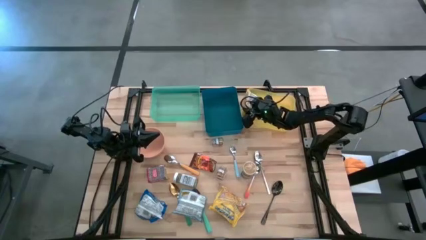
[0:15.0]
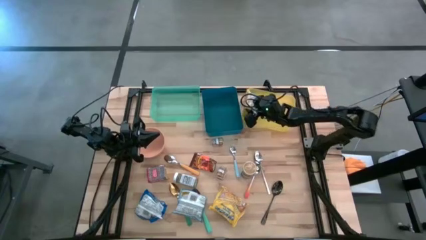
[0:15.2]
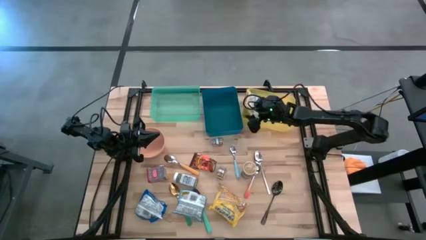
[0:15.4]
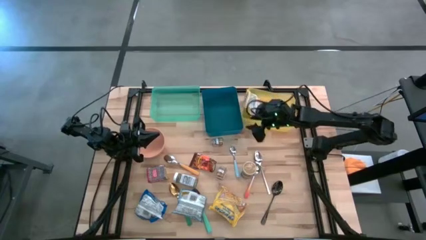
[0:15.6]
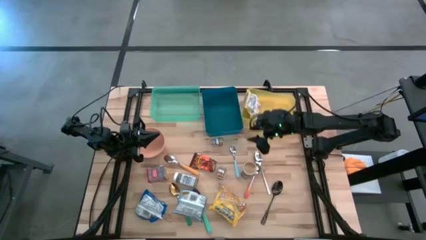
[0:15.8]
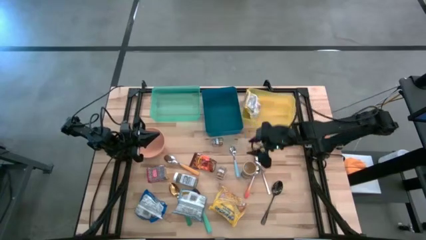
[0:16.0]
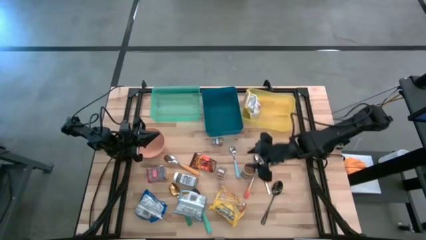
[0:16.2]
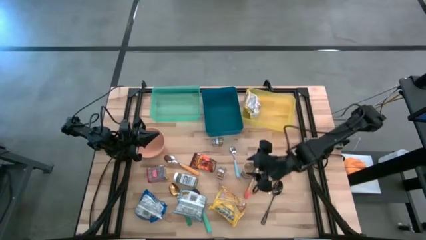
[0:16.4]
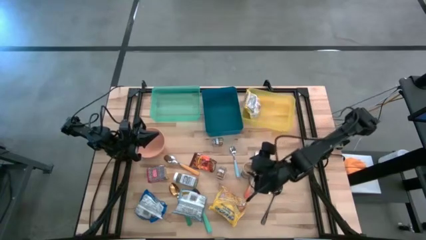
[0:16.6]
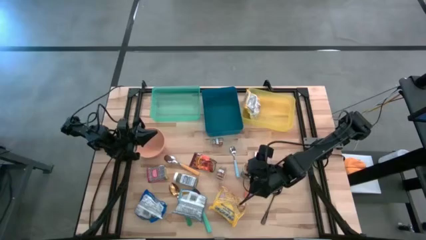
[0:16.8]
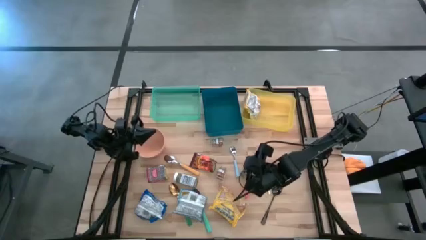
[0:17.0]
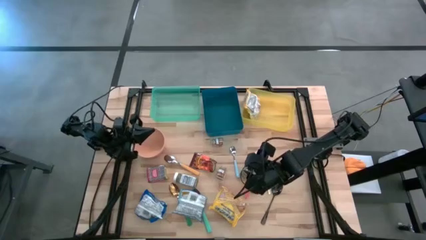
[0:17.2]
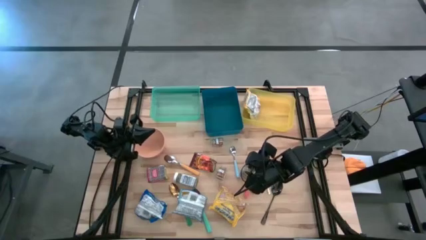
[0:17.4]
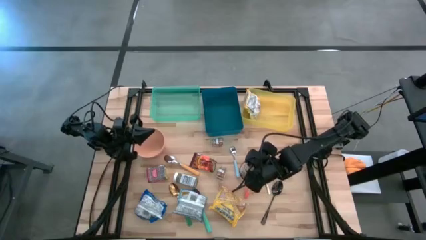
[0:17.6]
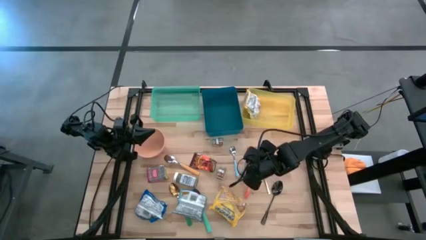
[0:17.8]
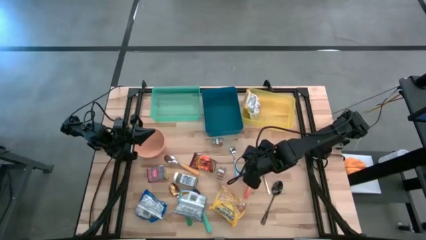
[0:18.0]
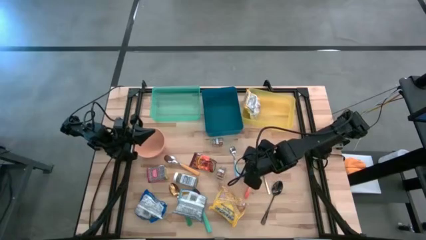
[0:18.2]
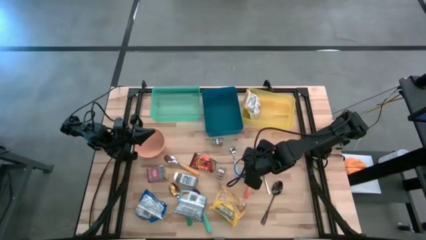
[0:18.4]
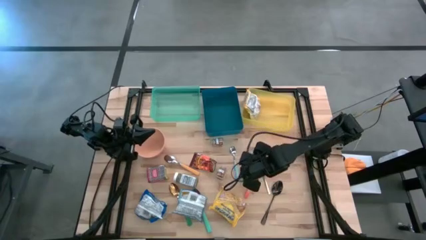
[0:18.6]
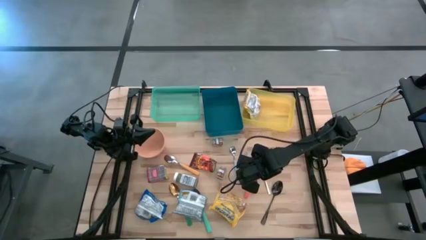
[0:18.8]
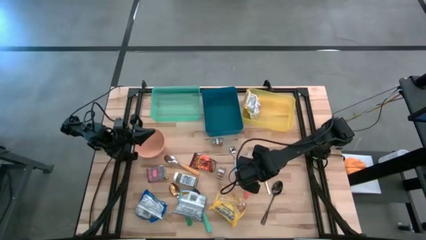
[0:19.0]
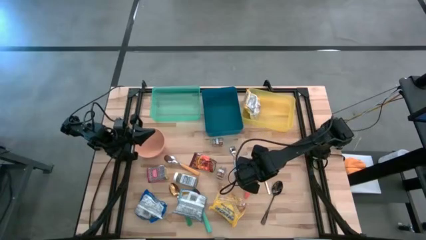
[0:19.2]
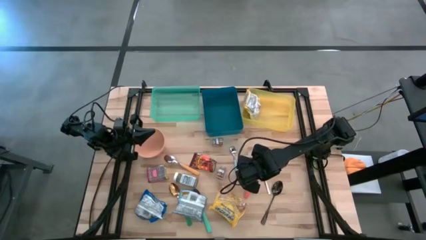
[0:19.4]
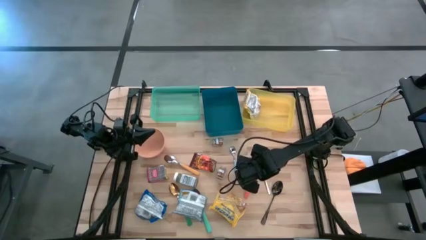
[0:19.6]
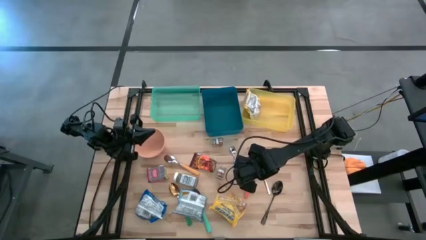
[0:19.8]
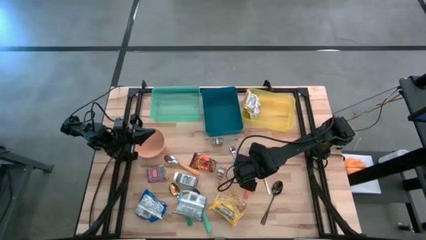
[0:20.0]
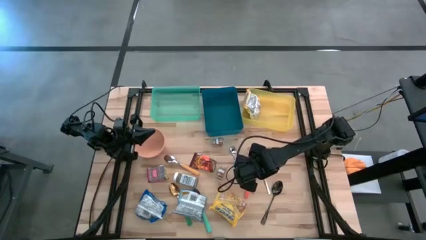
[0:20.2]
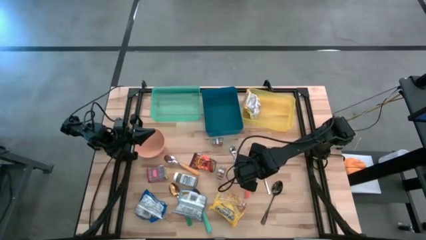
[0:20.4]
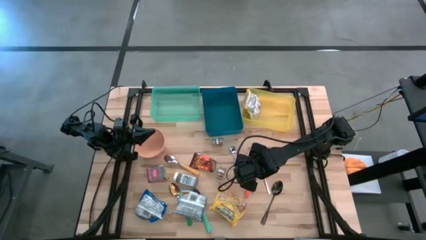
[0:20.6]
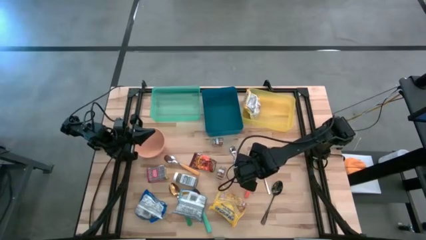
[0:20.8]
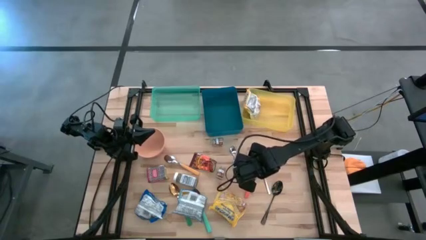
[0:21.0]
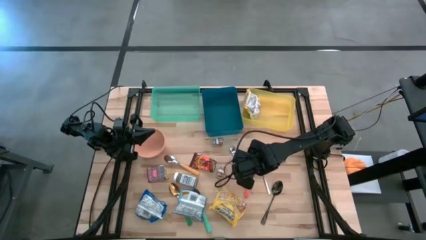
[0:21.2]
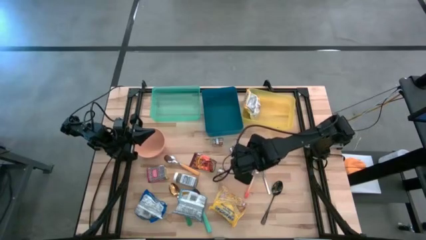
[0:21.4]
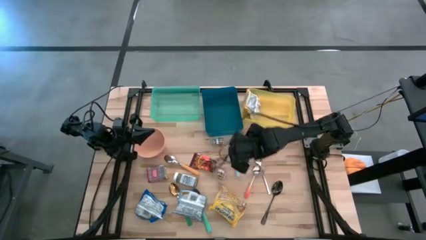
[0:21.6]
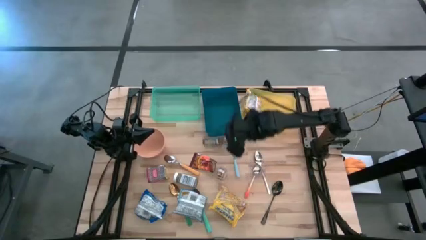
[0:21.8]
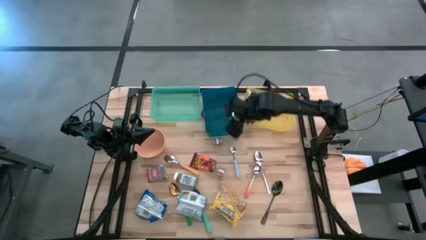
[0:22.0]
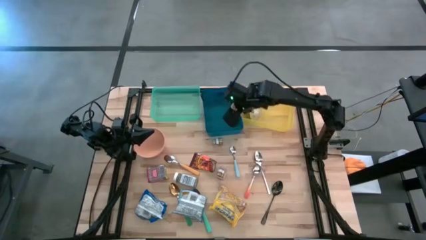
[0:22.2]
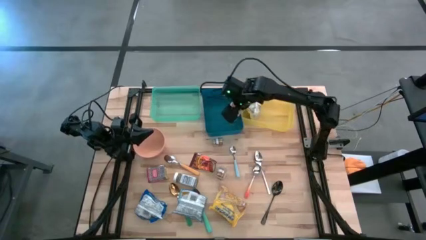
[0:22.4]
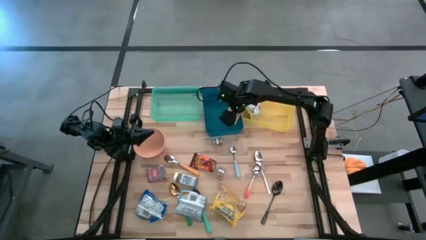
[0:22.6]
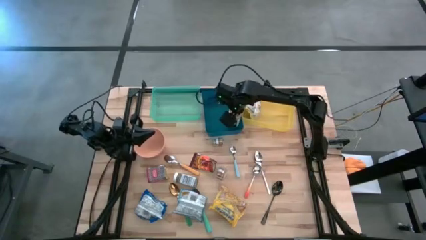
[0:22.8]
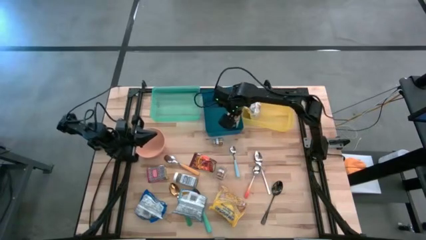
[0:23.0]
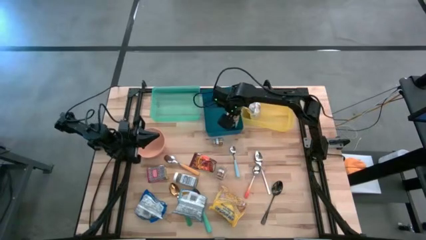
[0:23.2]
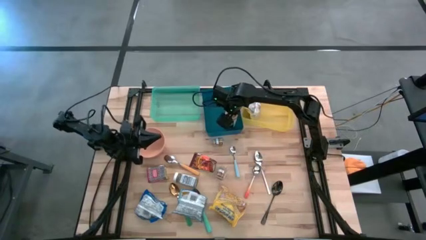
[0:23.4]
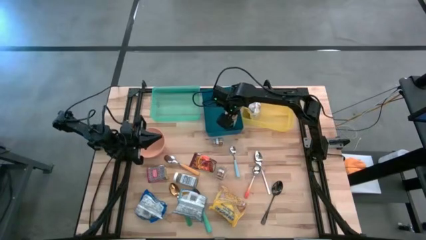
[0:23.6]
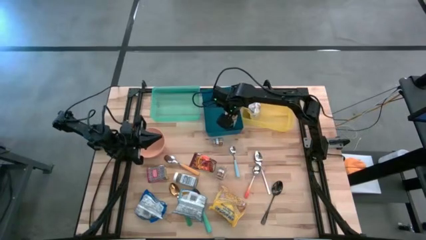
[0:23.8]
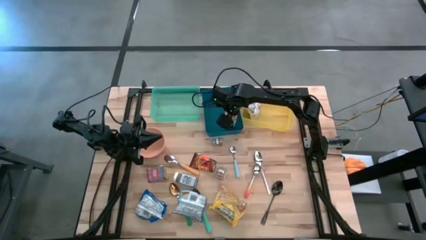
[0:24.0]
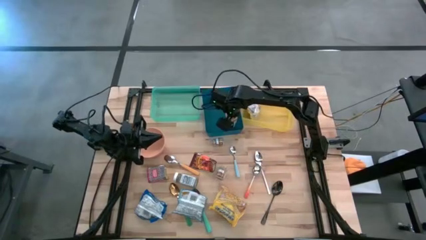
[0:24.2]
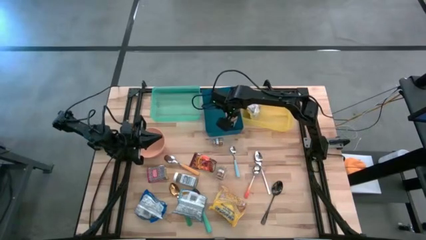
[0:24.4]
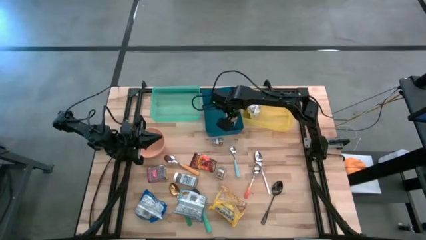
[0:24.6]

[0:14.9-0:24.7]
Put the gold seasoning bottle into the blue bin

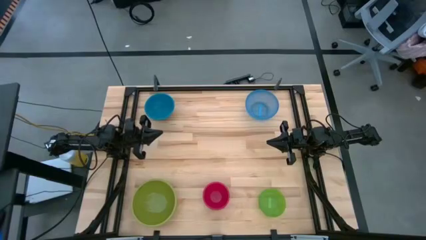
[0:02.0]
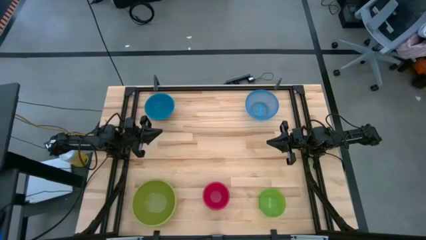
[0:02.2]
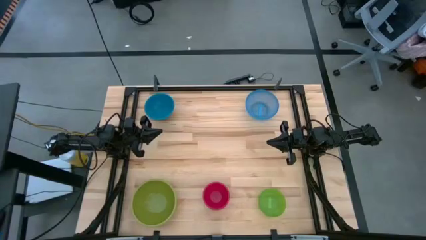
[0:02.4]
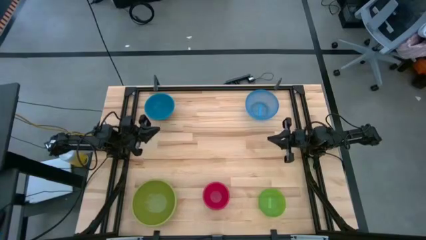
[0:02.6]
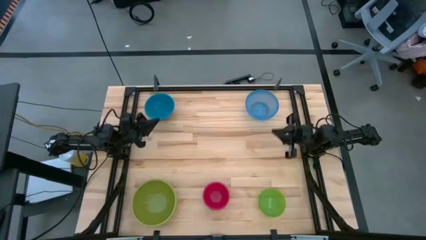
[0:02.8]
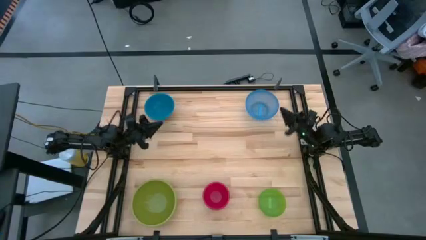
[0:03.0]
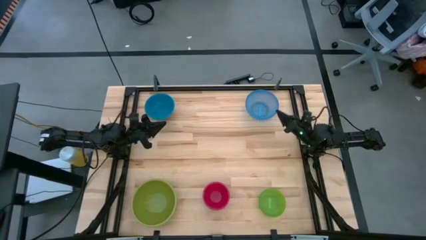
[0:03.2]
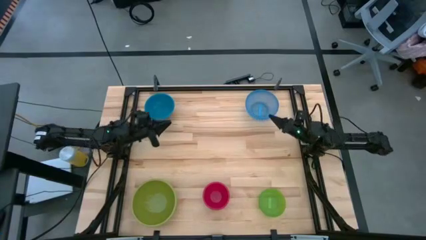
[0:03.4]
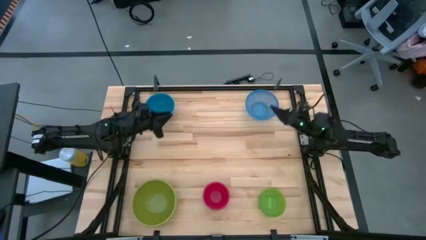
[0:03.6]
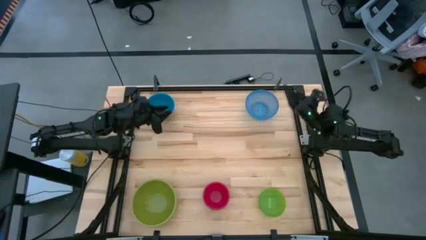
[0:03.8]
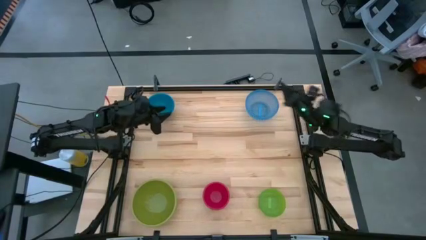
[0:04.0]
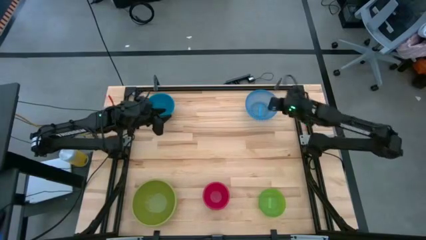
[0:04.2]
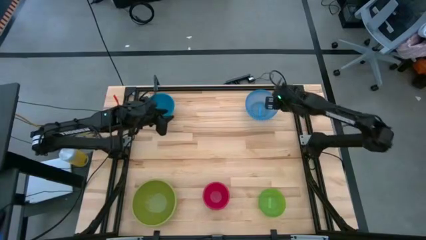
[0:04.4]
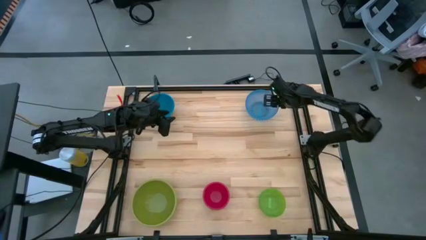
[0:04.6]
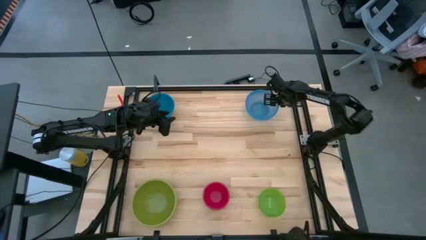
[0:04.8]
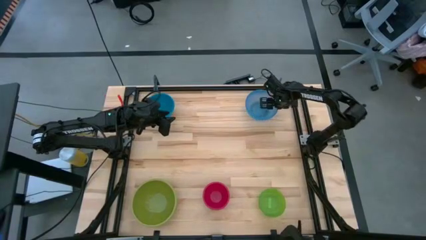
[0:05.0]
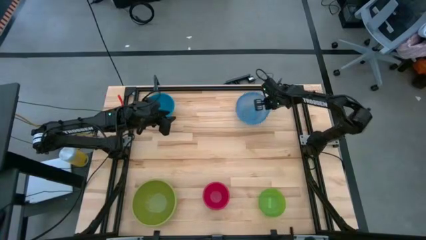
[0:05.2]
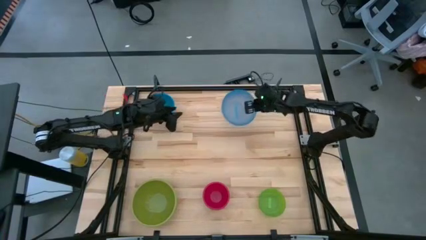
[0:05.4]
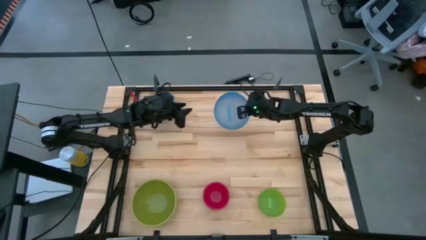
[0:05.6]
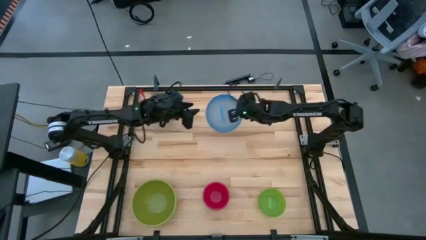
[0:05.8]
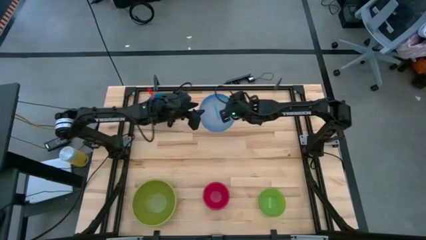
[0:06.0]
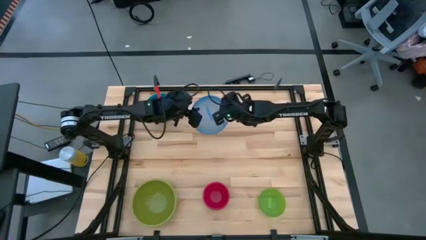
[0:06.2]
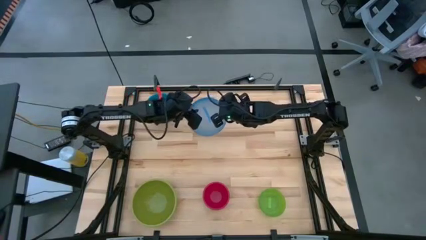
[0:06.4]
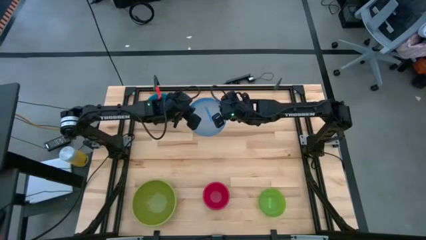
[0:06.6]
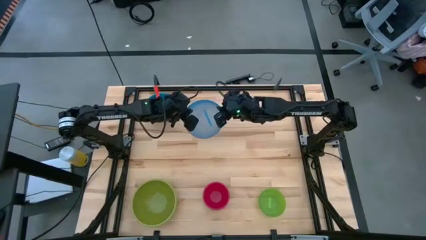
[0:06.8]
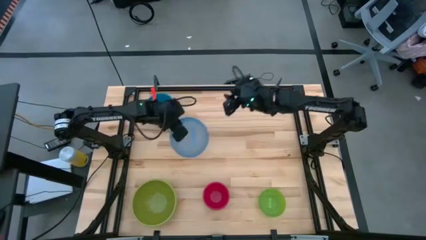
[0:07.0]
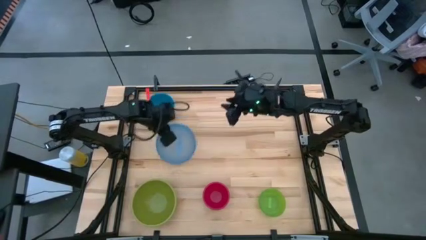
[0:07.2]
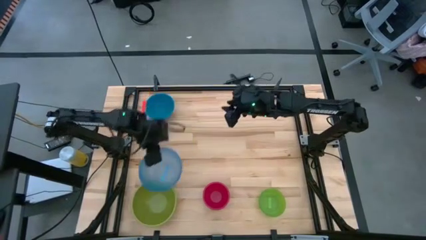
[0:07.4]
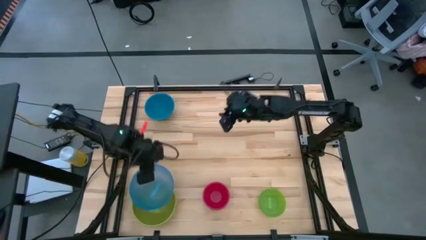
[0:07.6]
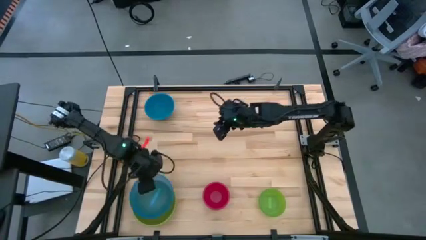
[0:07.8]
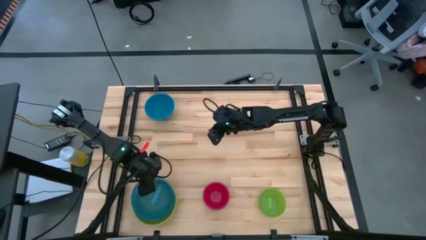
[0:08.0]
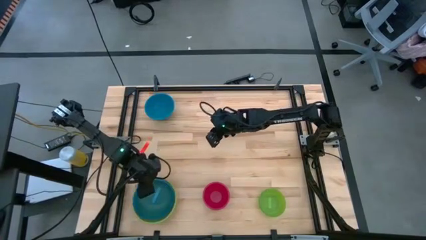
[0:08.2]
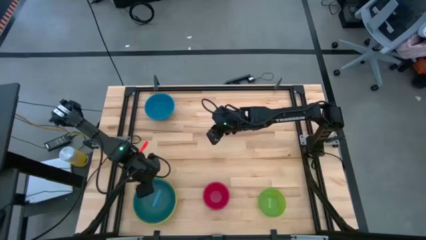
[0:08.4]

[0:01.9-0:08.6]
Stack the transparent blue bowl on top of the green bowl
